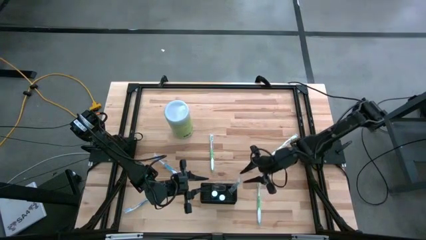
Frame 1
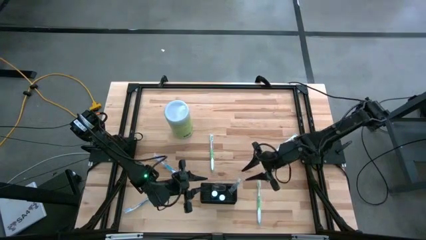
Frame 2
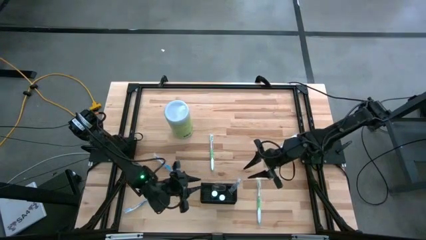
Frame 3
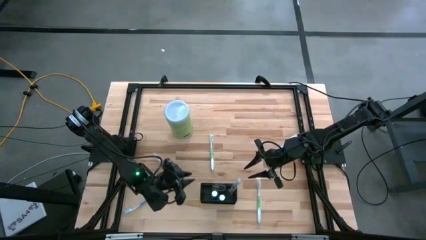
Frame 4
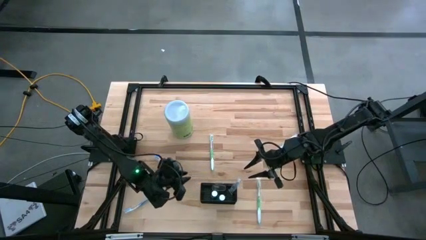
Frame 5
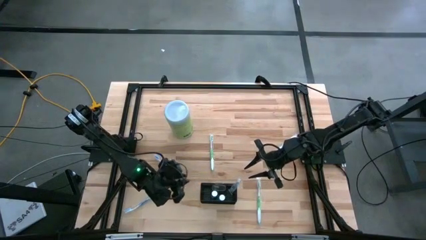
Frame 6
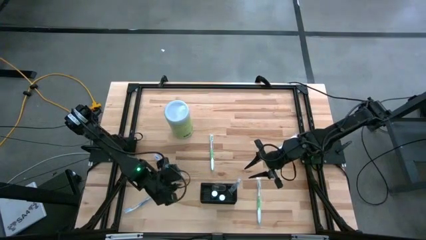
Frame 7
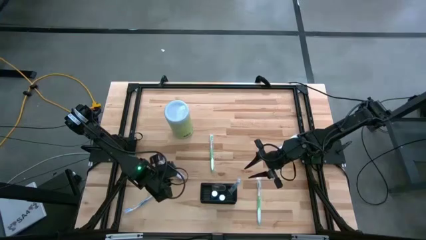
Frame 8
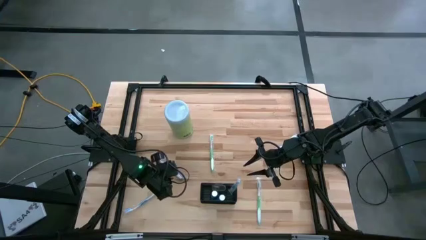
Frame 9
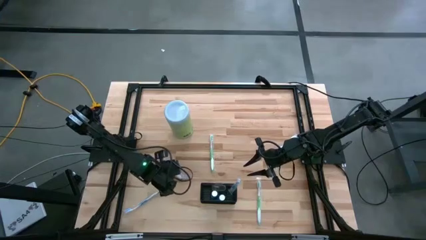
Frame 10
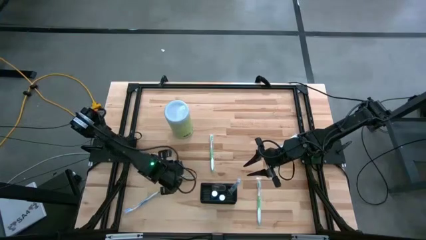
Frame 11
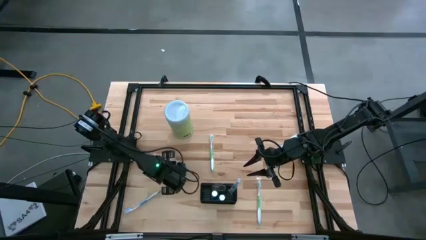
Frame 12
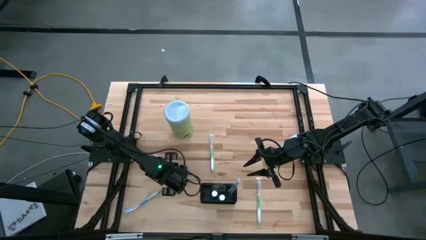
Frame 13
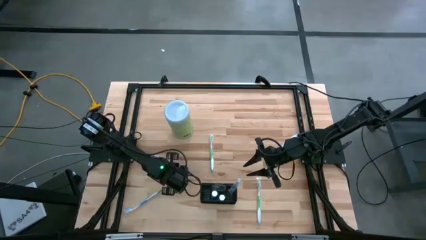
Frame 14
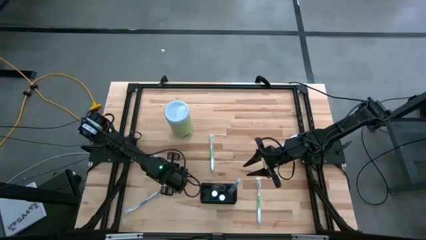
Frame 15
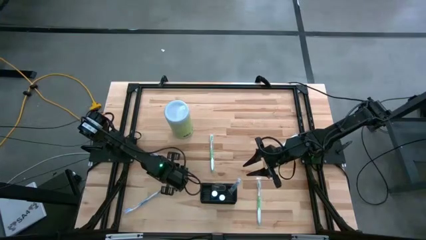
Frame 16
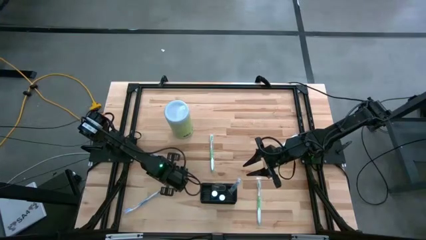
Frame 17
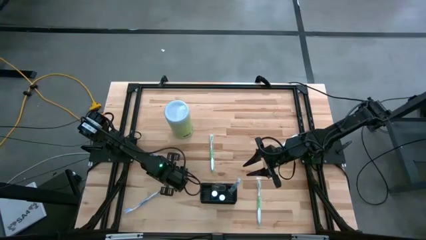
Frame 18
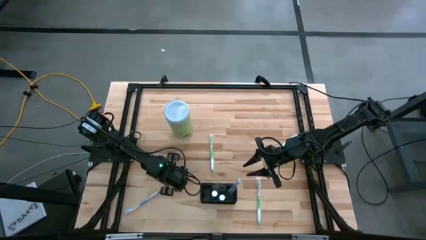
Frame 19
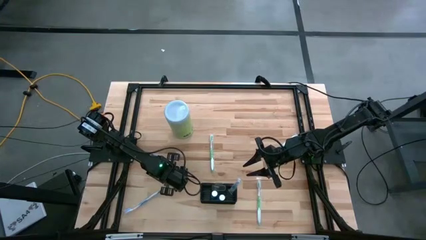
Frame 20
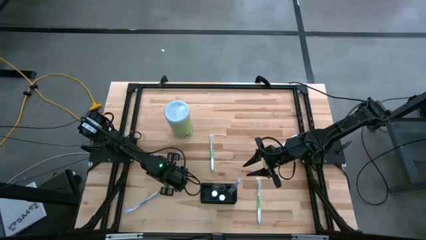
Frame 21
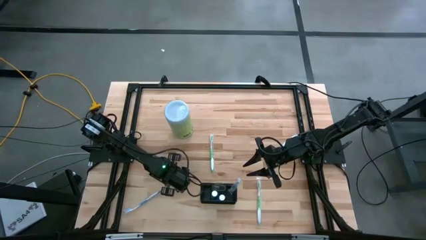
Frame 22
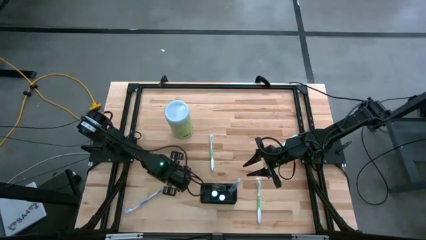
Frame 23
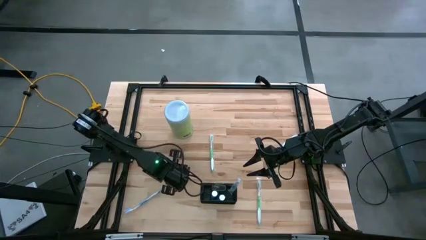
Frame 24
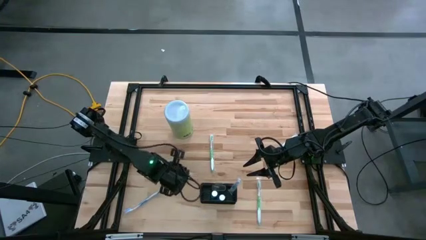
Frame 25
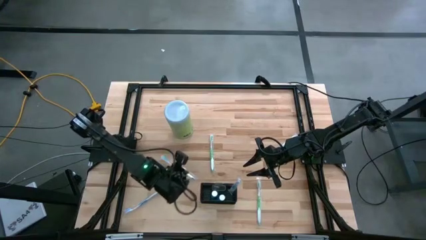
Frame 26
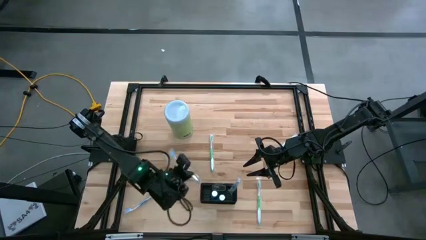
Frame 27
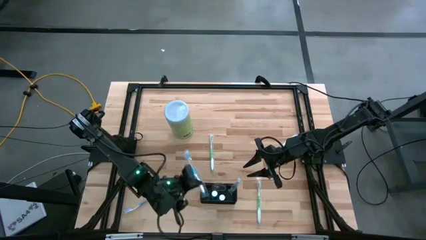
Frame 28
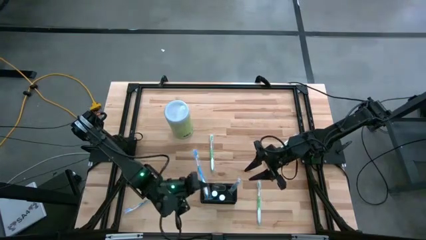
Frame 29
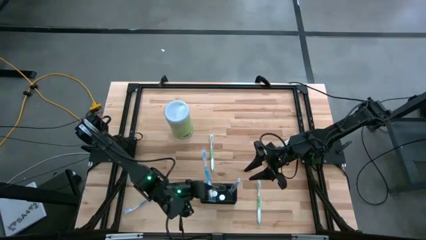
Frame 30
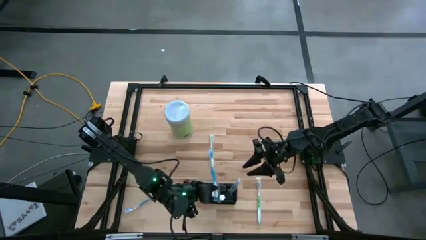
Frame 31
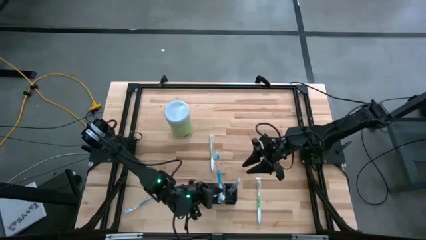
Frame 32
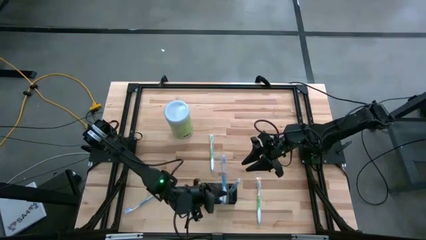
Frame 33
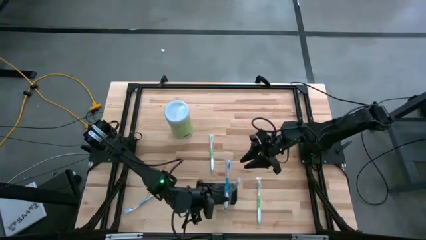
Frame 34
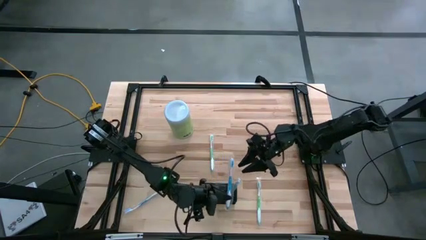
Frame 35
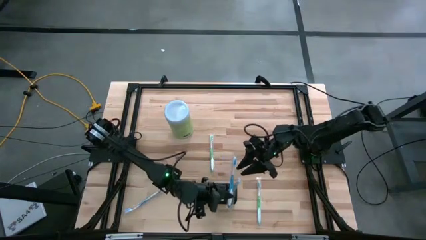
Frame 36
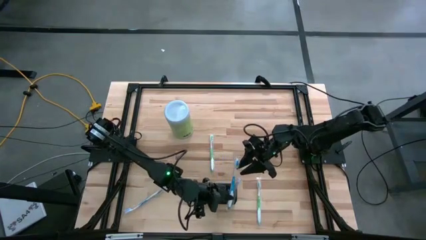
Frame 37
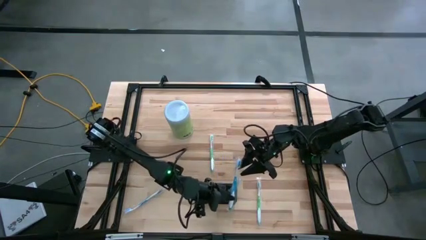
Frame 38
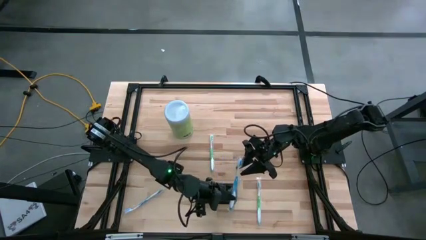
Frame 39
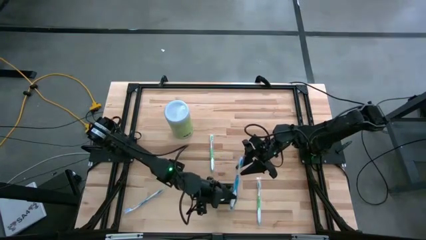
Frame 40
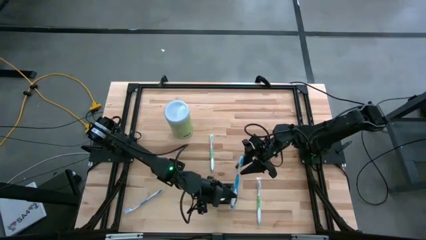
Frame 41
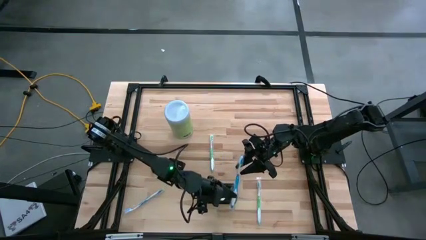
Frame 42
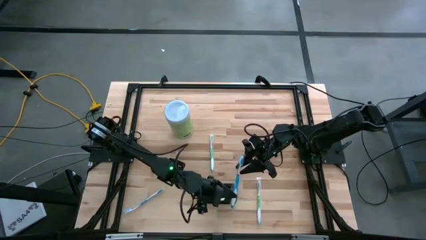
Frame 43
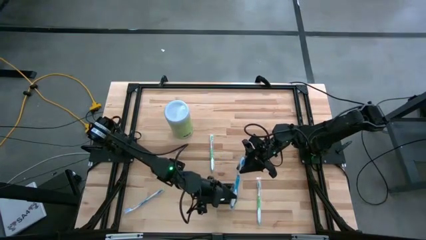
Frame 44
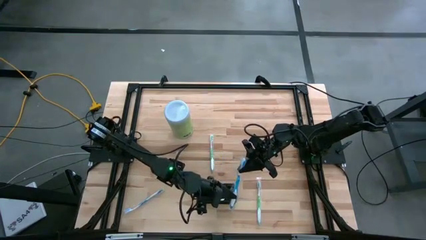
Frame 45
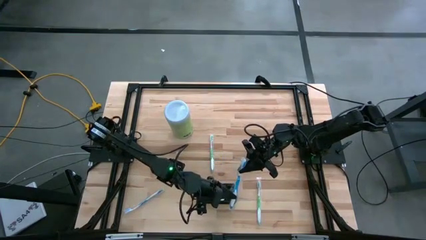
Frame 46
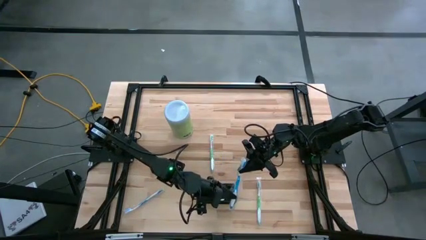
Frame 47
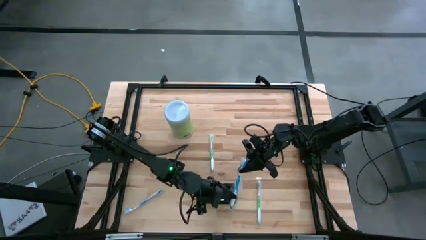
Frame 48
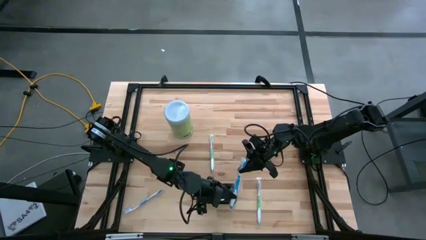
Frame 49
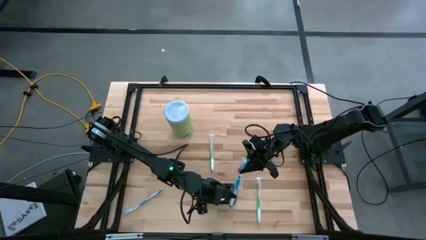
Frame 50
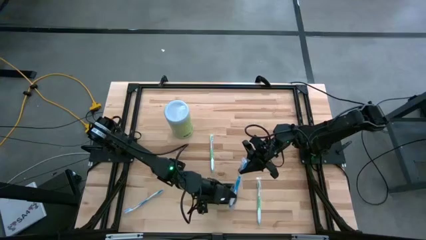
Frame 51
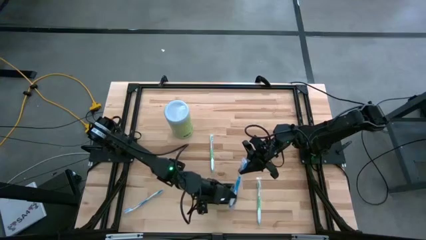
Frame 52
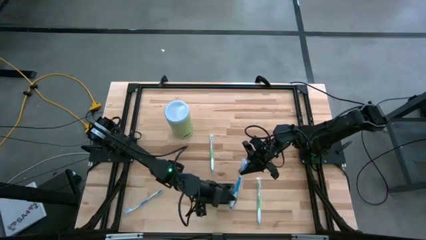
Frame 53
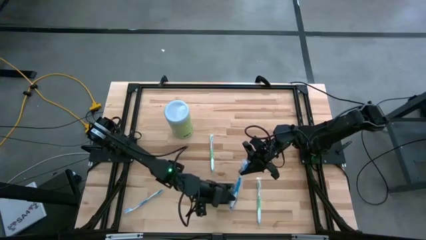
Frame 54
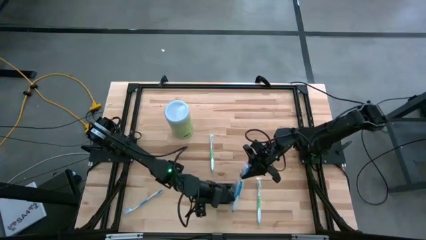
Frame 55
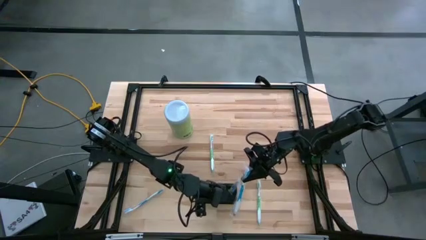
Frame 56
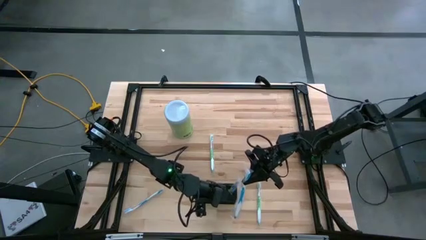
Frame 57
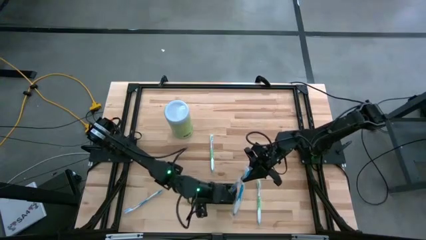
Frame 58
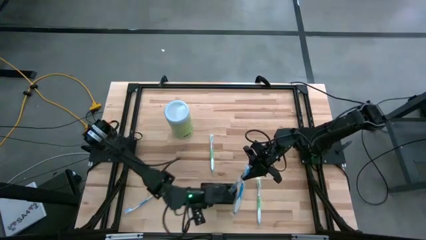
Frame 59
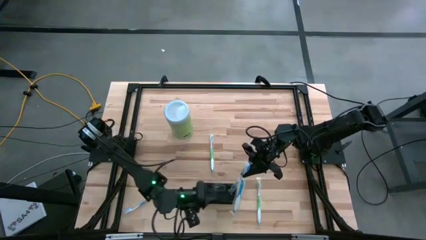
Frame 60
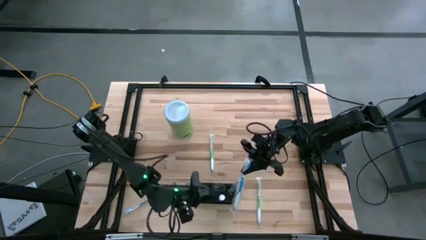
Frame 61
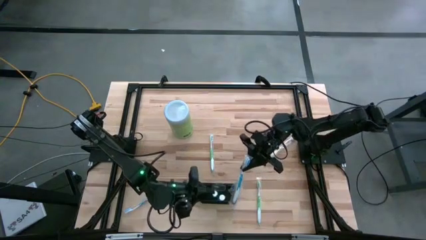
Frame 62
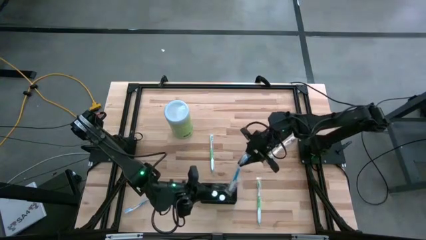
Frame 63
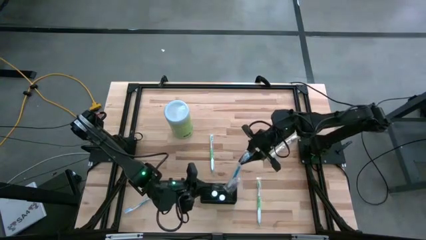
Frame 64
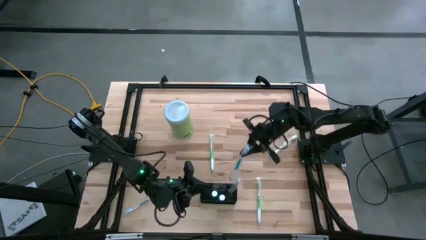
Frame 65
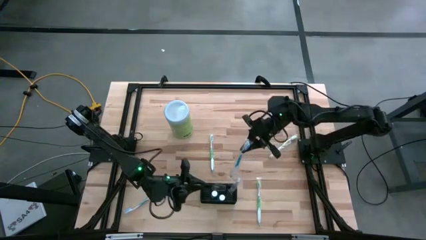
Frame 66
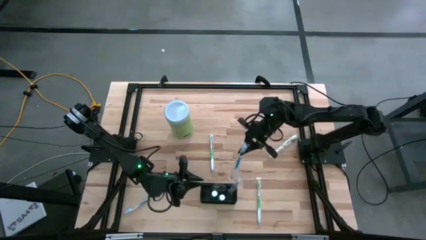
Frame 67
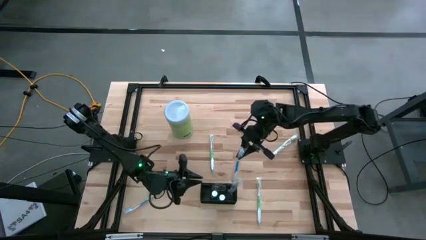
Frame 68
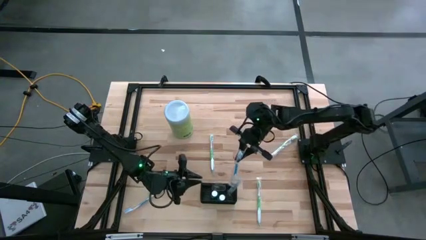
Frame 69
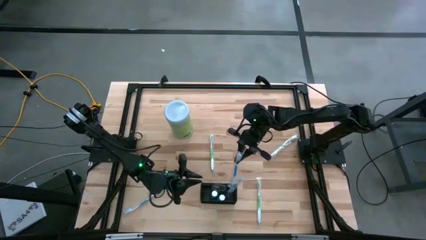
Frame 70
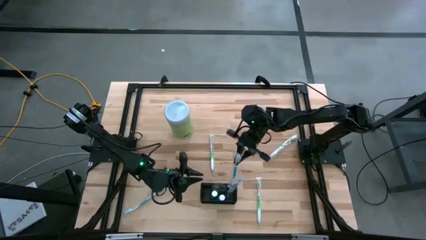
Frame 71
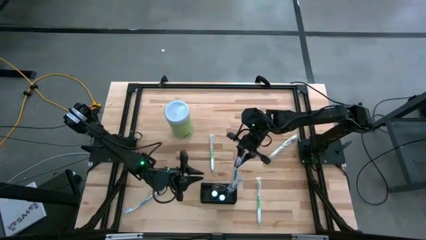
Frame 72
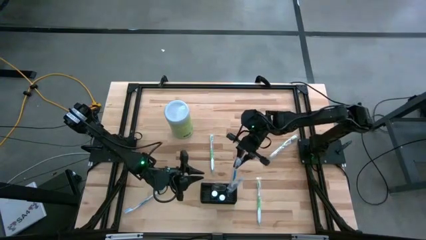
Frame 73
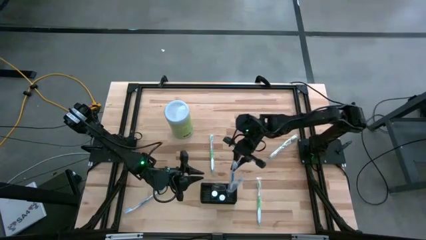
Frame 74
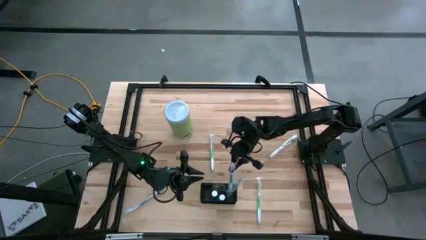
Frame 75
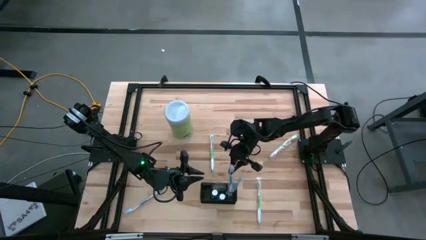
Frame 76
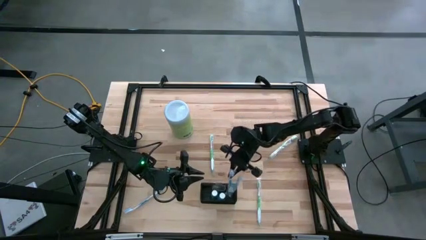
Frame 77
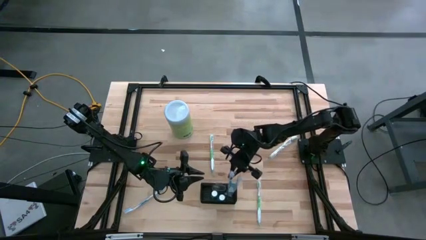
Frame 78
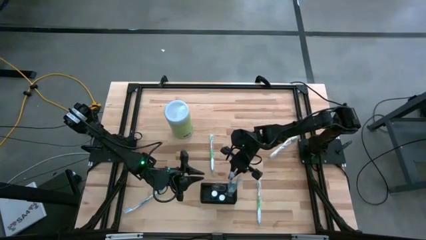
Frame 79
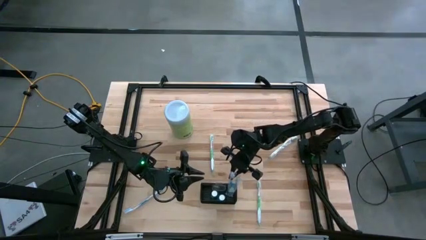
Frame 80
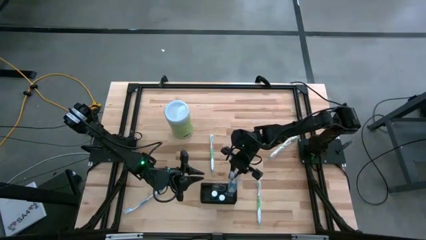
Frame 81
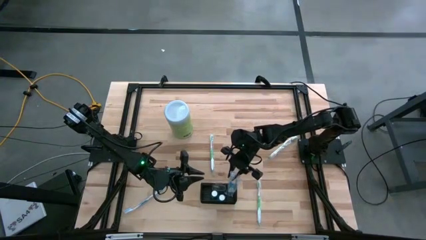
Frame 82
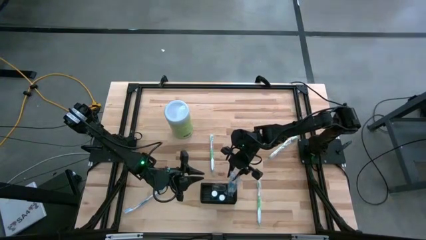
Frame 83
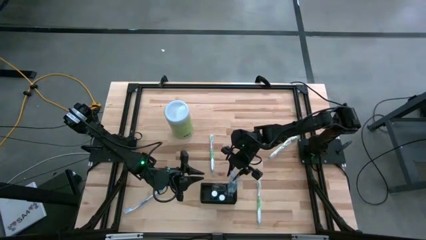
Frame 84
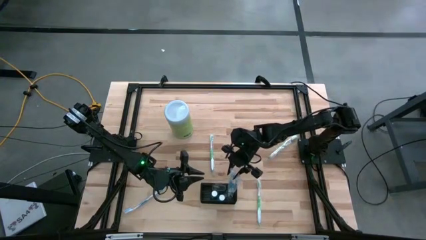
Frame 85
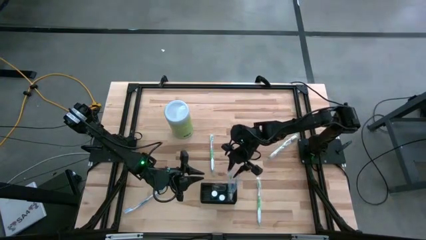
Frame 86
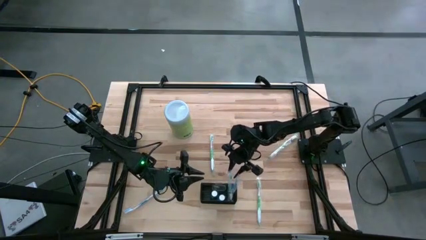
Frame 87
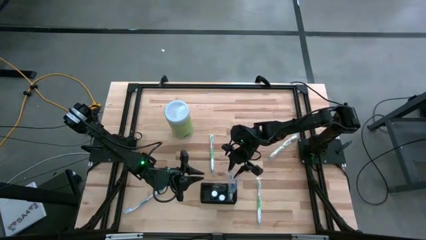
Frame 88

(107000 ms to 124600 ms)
Task: Pick & Place toothbrushing station
Put the top blue toothbrush into the mesh organizer
